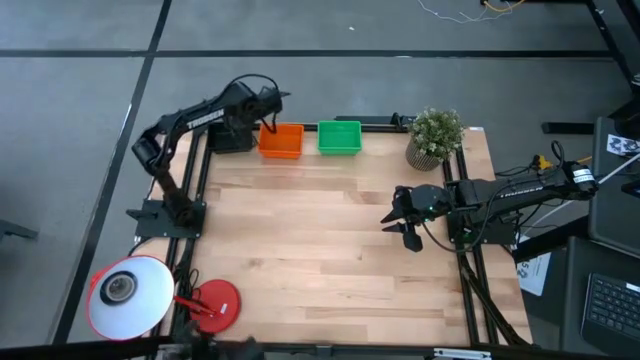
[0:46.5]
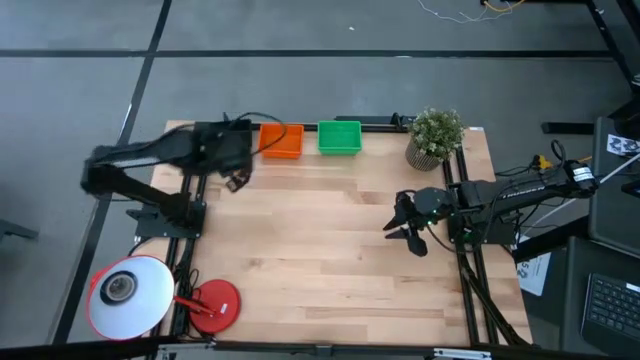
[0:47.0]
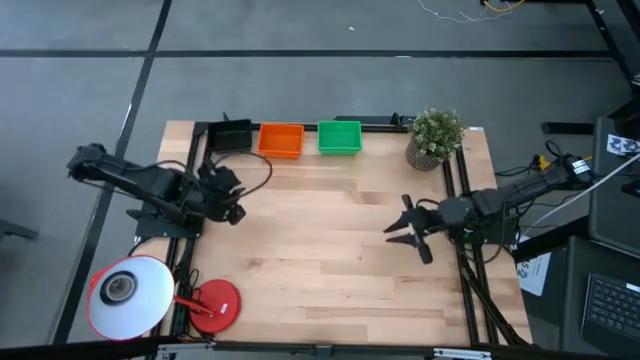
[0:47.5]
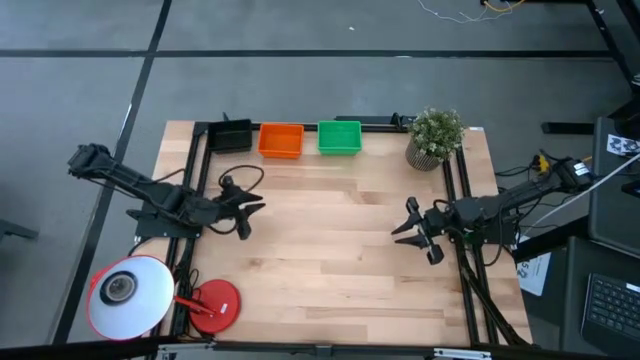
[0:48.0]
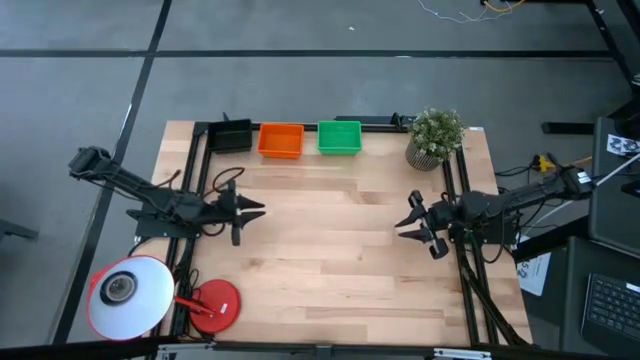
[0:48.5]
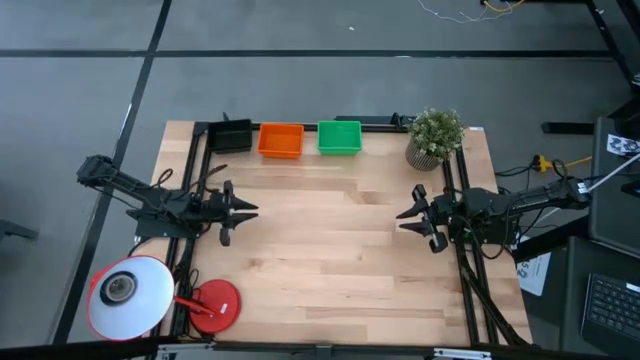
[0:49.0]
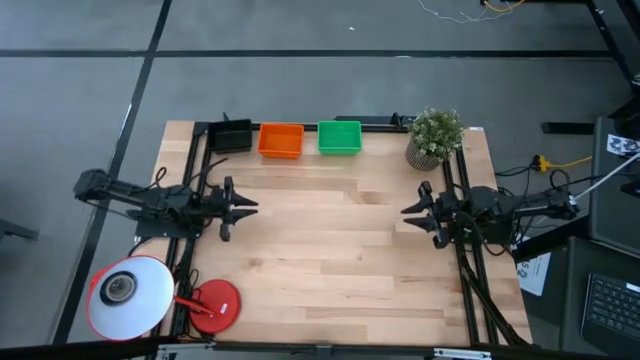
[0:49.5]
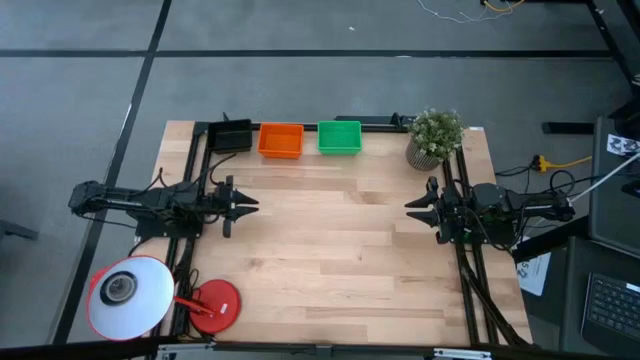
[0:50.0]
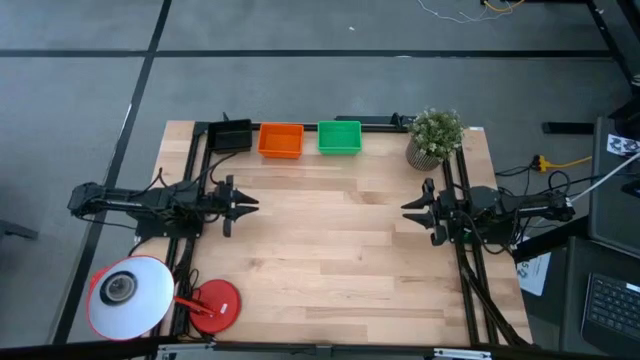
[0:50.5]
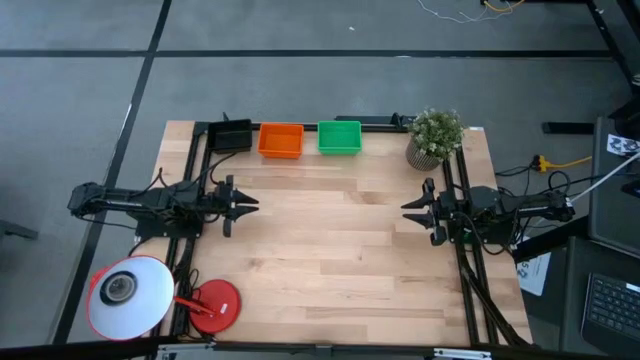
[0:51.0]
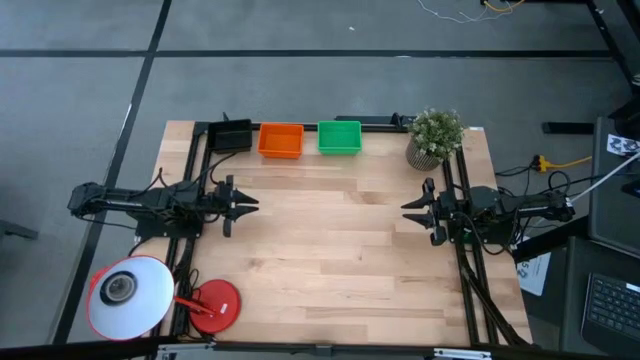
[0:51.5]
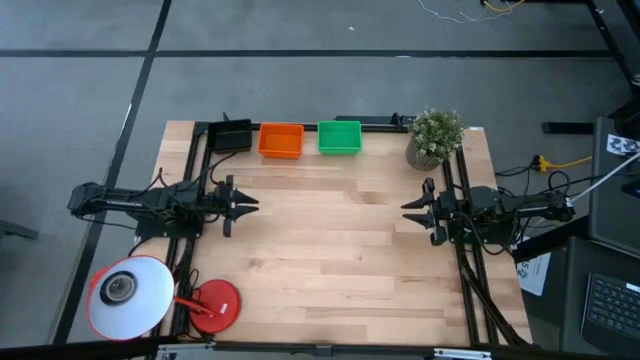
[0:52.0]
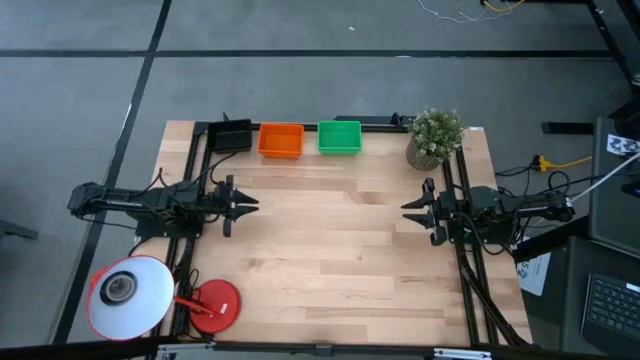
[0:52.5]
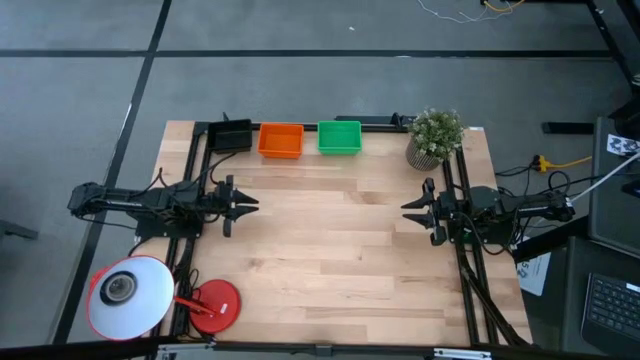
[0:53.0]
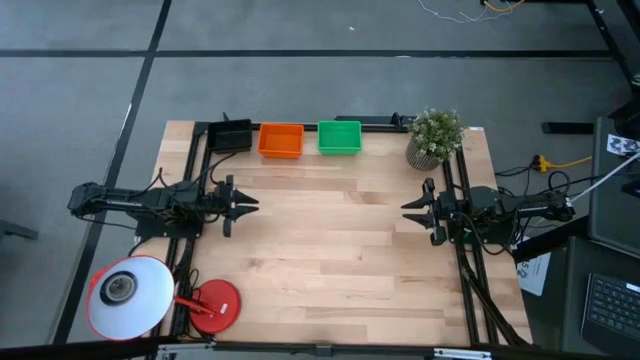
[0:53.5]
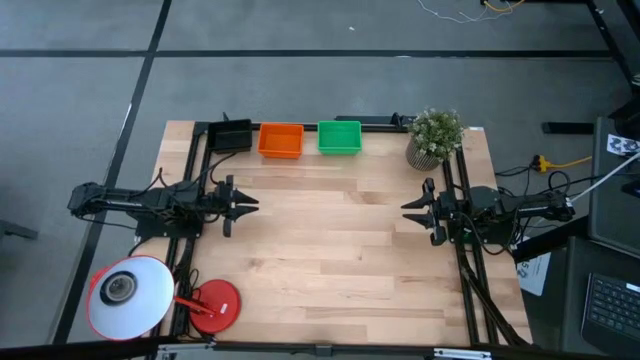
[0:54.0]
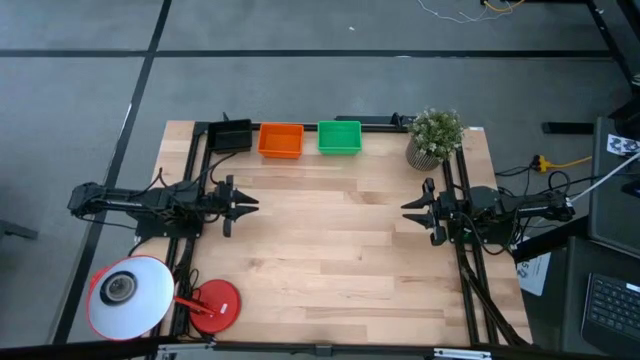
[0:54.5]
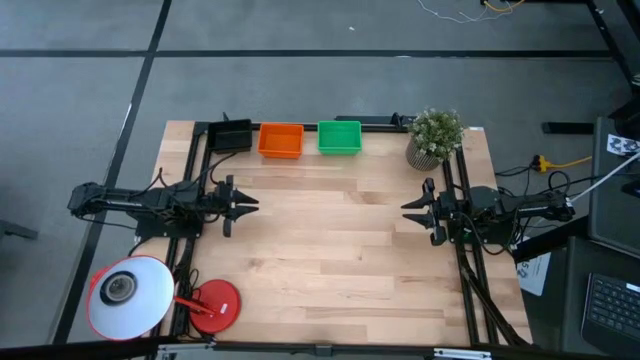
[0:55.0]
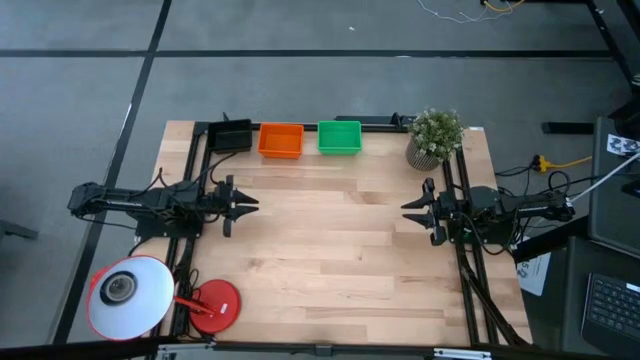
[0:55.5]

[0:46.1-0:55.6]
Return to Home Position

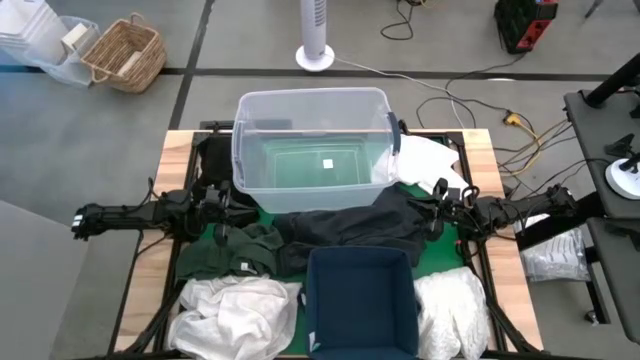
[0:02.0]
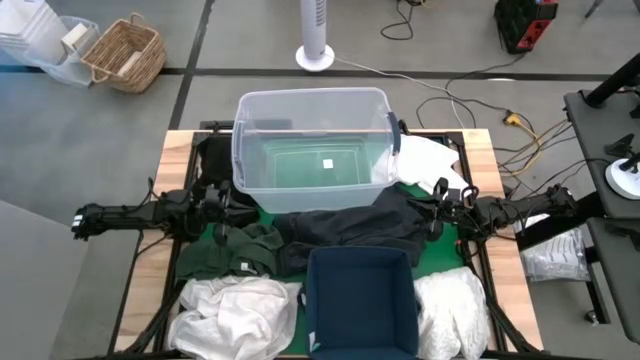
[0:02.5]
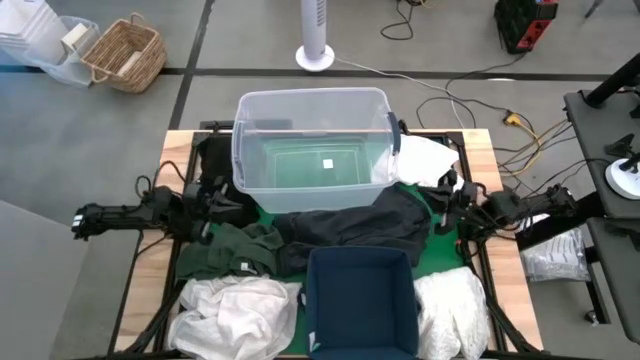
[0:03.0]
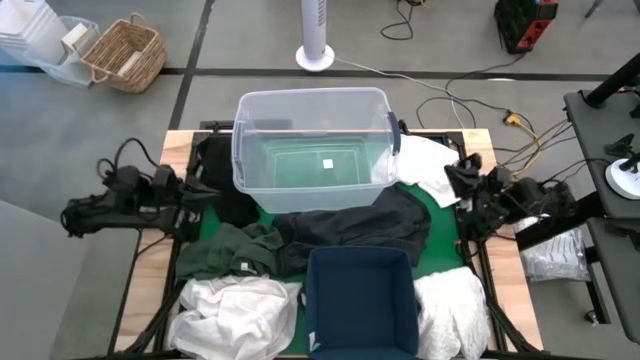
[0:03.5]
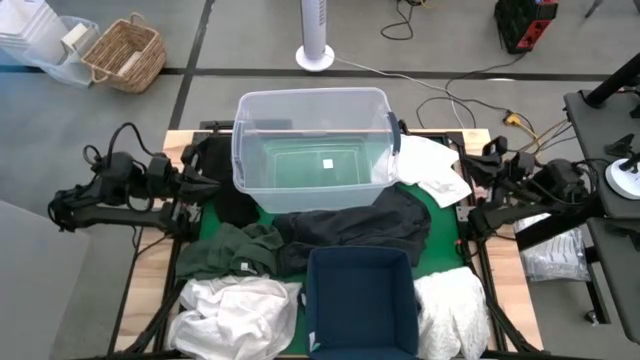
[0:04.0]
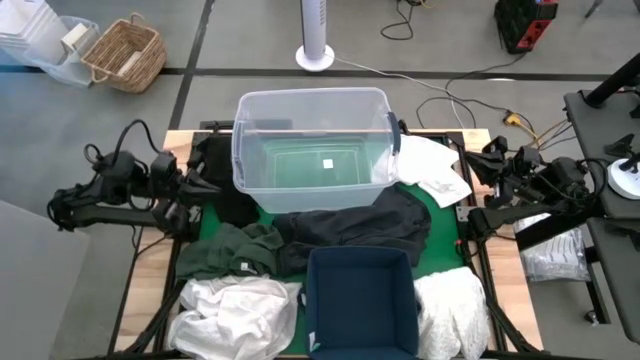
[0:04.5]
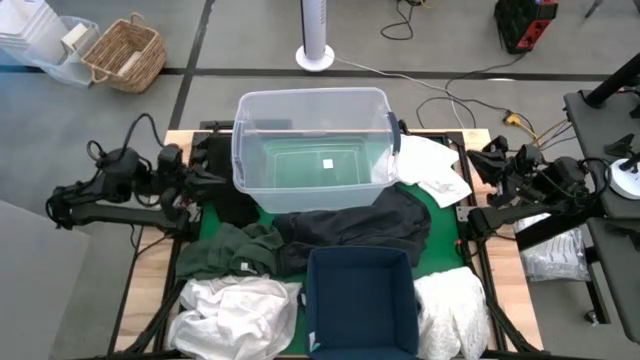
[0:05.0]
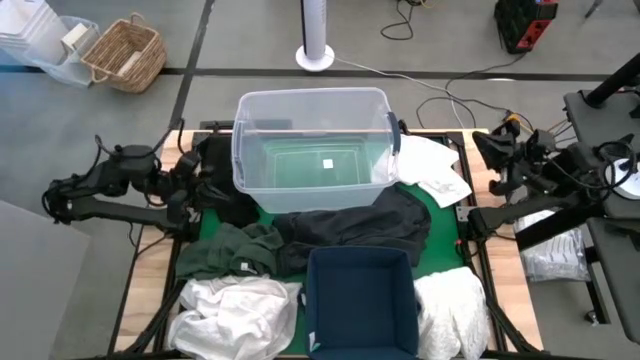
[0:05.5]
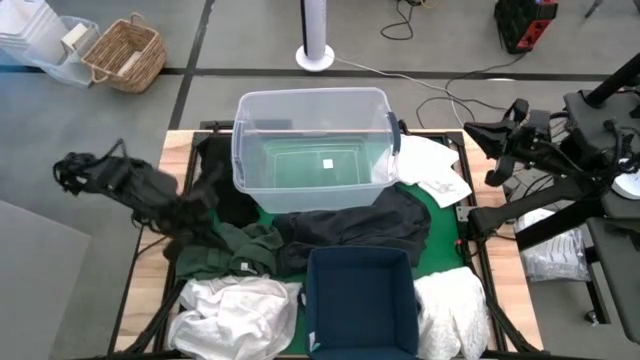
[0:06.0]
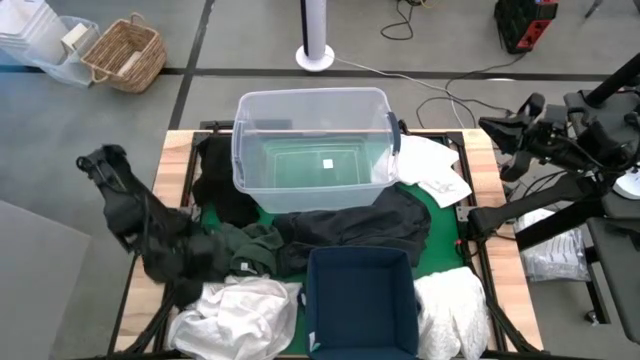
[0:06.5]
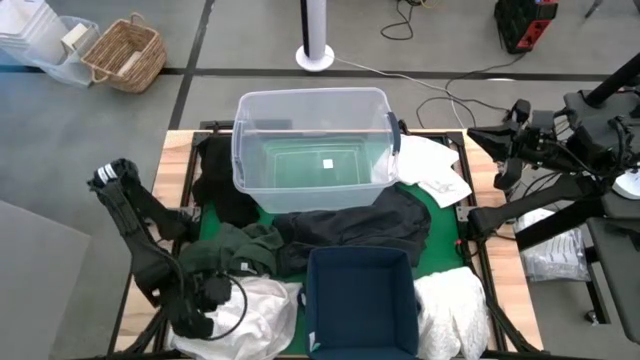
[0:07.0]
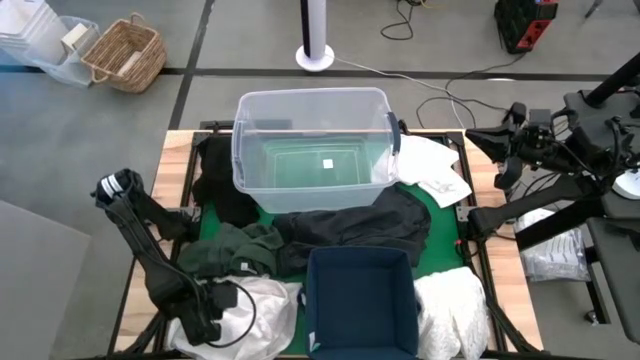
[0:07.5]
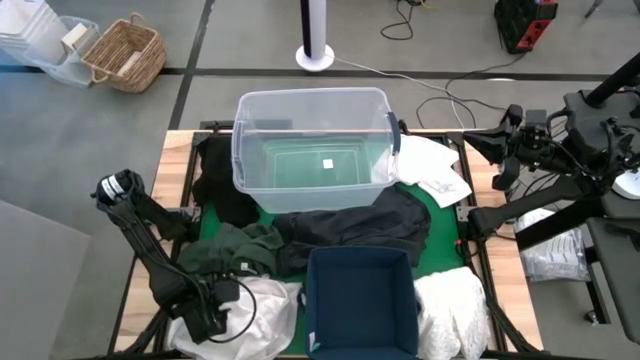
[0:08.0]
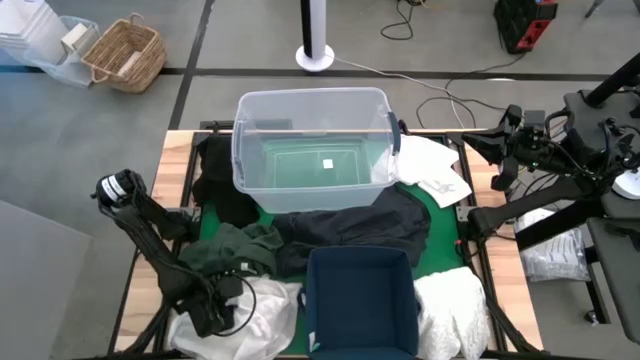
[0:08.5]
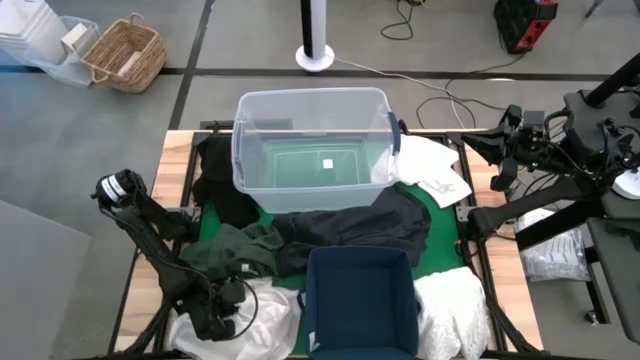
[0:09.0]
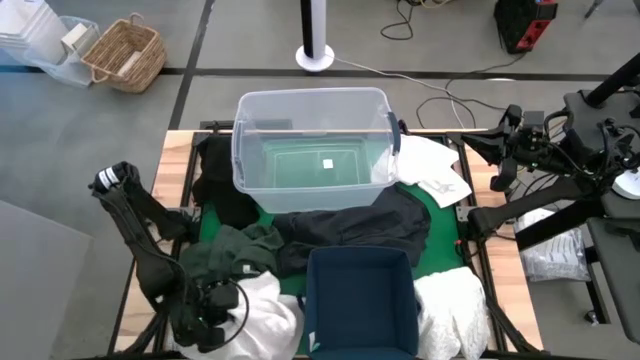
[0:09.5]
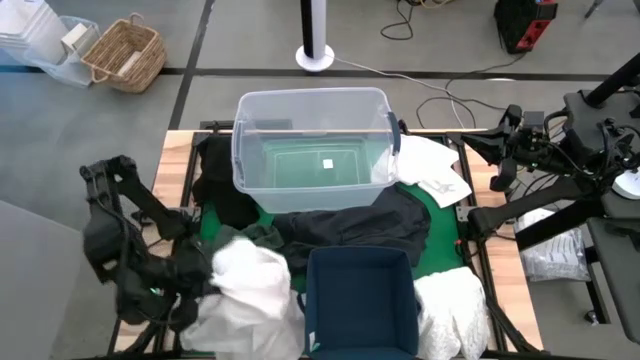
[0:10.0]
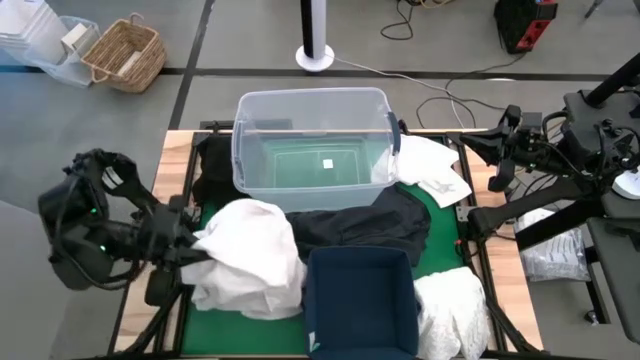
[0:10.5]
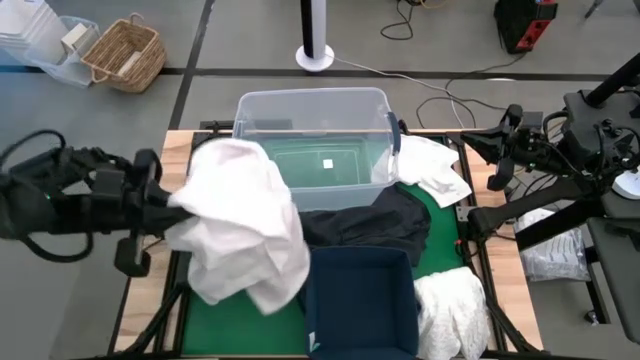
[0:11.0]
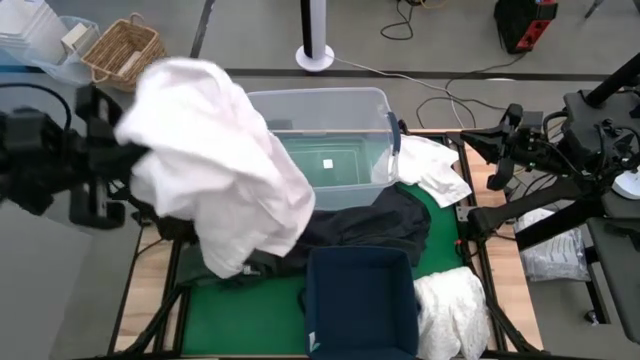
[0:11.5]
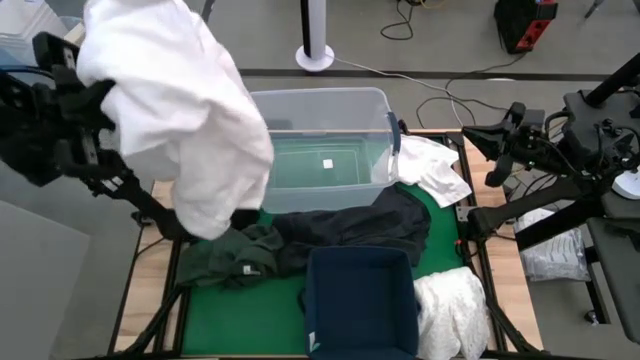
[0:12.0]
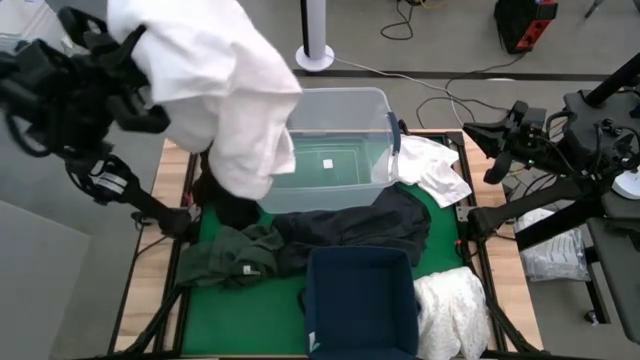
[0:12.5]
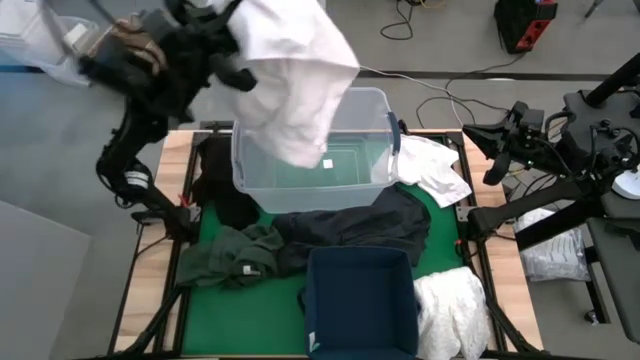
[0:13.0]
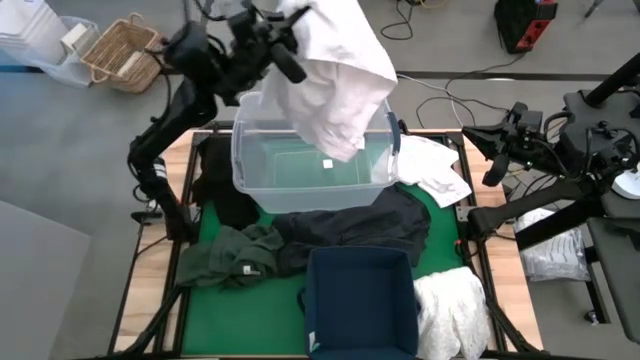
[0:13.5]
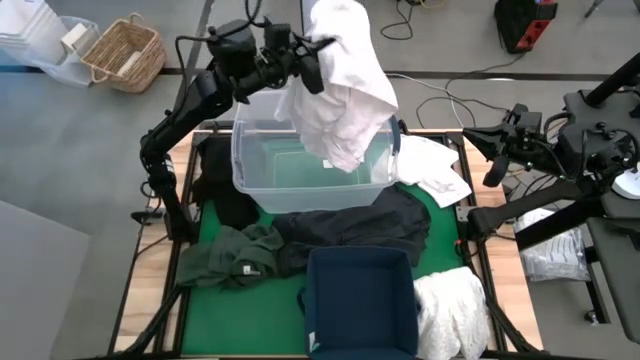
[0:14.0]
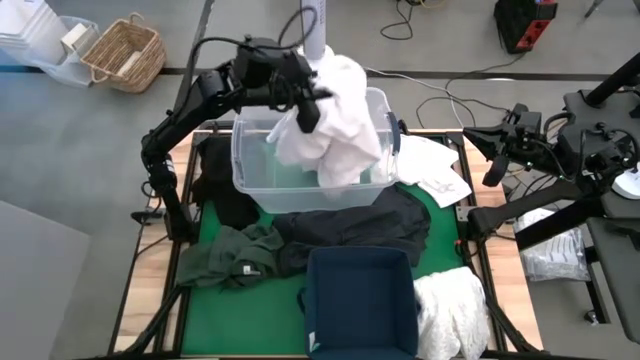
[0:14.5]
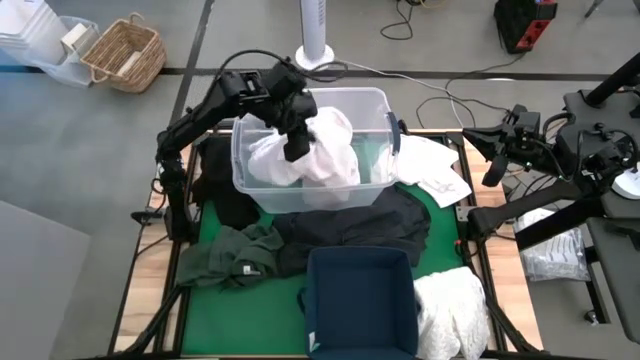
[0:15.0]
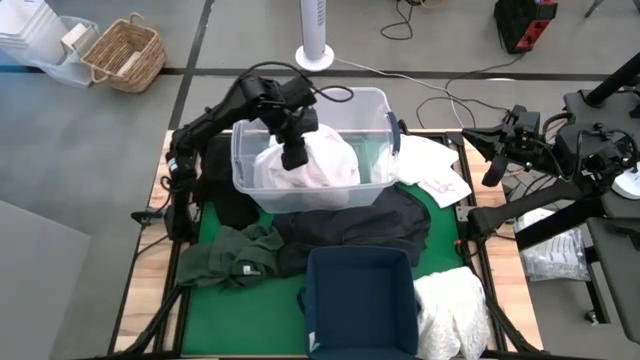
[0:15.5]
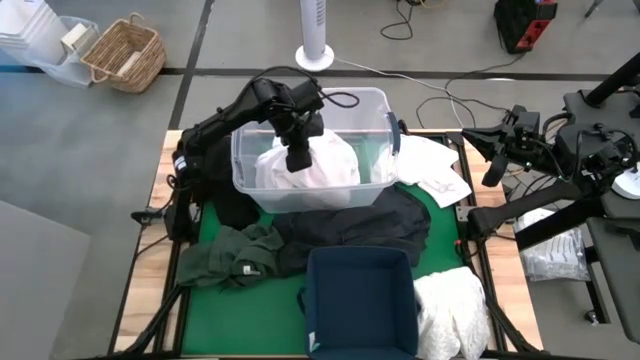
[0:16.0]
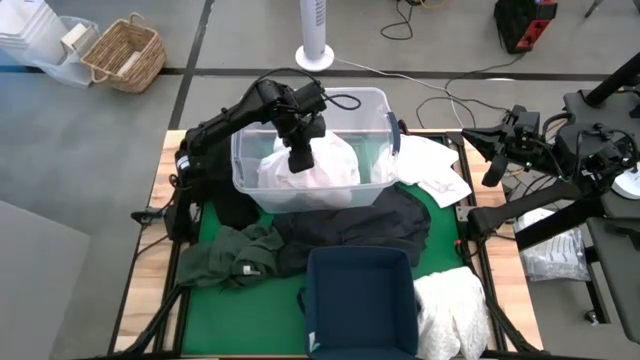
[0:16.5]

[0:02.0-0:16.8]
Put the white shirt into the transparent laundry bin
